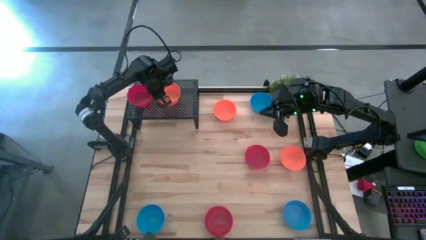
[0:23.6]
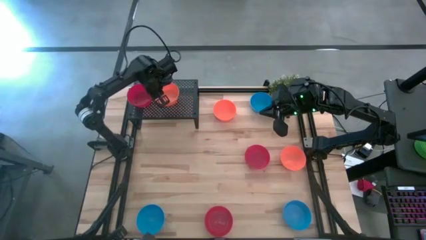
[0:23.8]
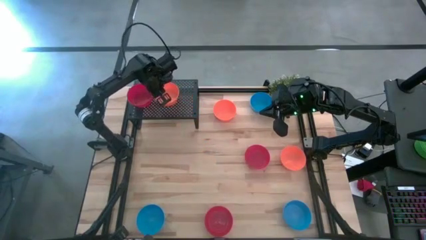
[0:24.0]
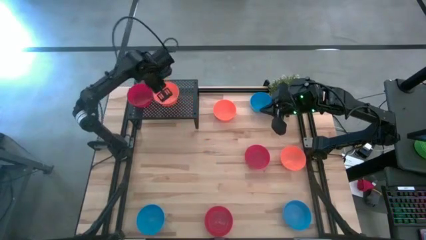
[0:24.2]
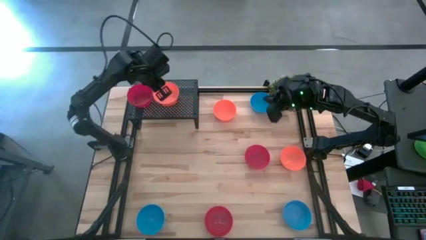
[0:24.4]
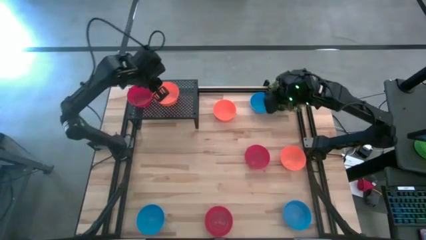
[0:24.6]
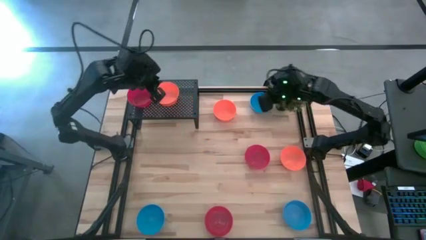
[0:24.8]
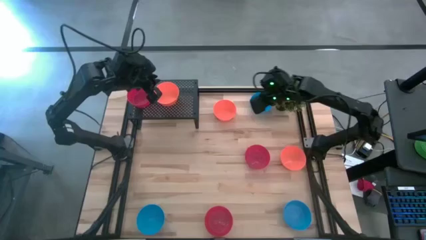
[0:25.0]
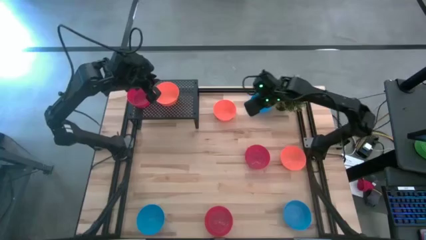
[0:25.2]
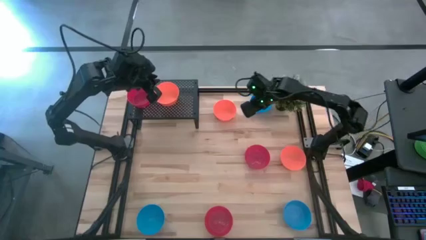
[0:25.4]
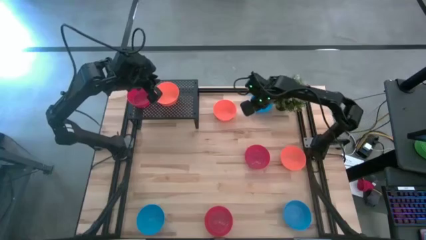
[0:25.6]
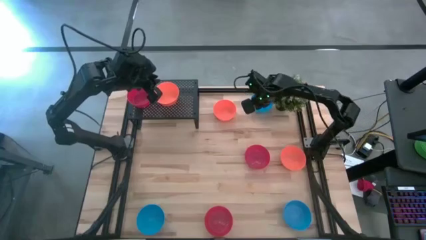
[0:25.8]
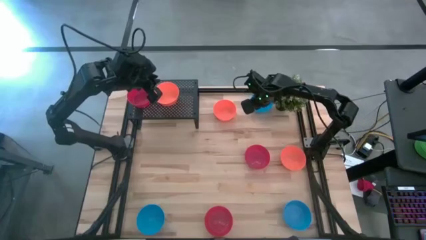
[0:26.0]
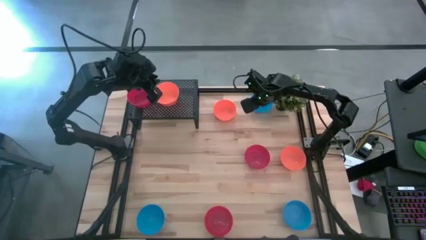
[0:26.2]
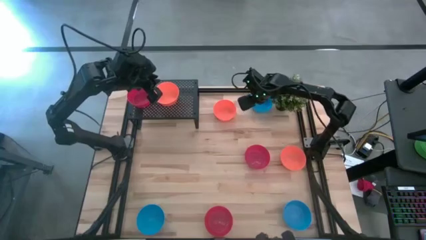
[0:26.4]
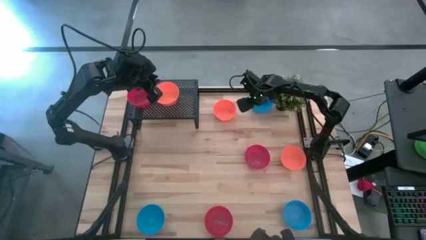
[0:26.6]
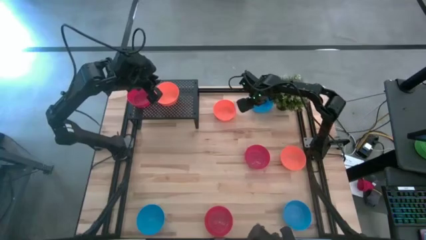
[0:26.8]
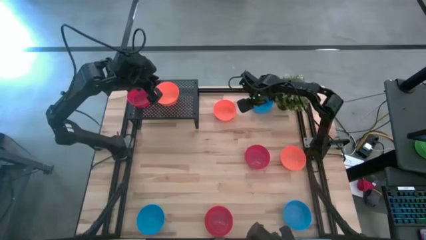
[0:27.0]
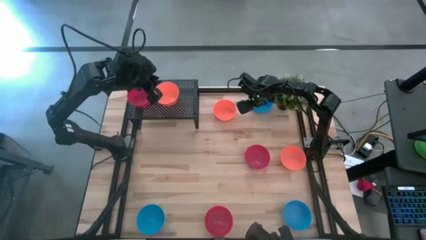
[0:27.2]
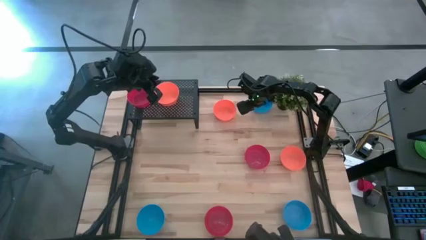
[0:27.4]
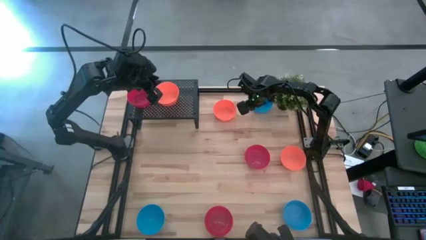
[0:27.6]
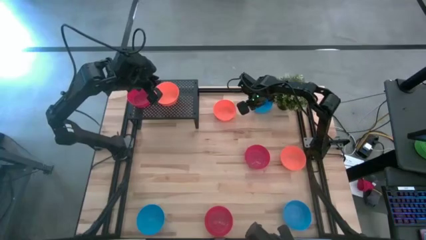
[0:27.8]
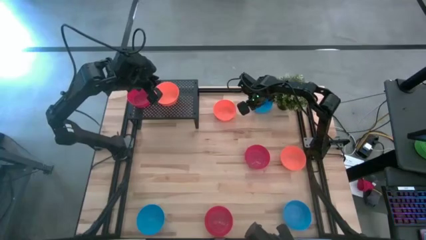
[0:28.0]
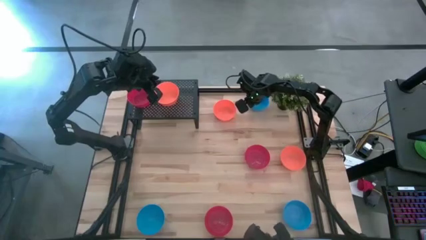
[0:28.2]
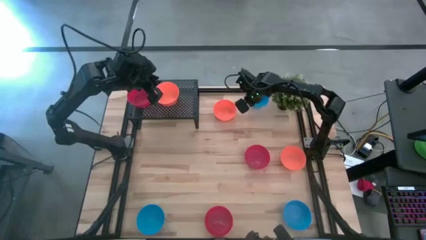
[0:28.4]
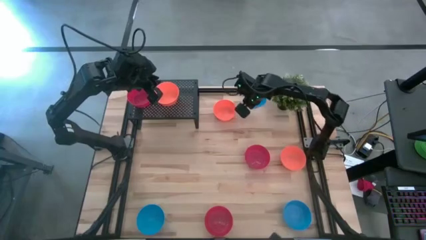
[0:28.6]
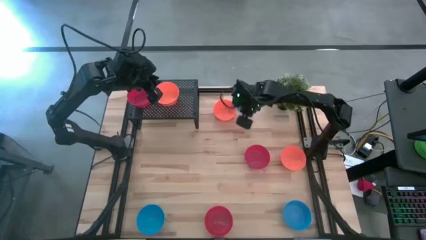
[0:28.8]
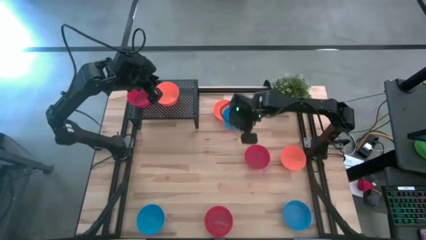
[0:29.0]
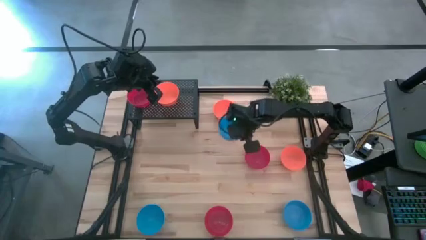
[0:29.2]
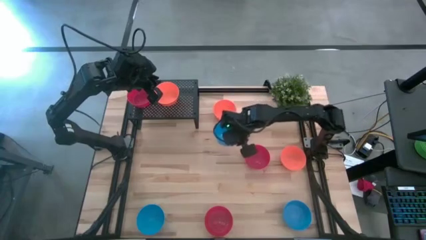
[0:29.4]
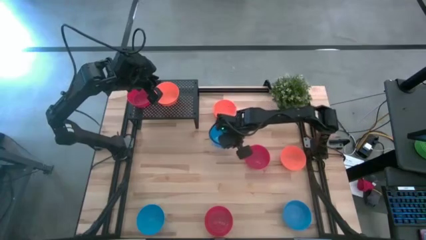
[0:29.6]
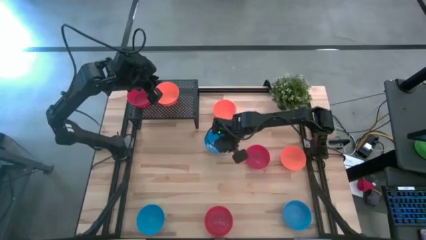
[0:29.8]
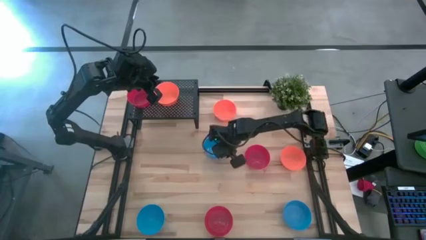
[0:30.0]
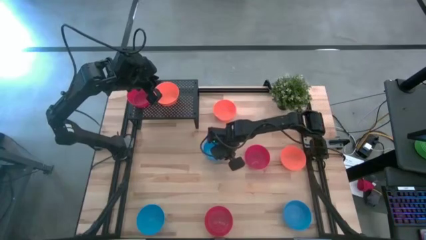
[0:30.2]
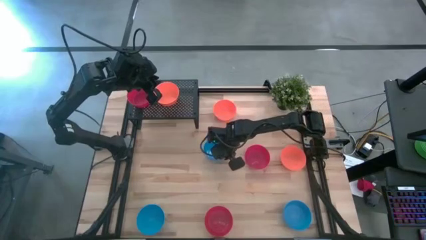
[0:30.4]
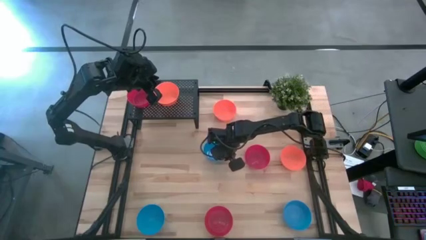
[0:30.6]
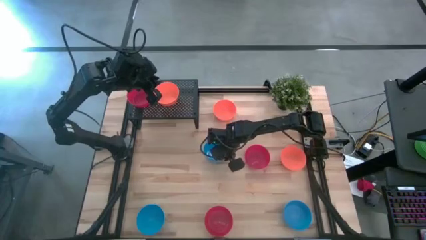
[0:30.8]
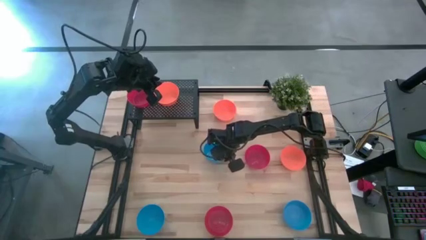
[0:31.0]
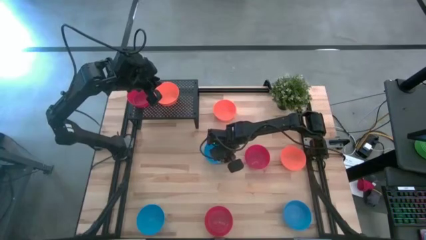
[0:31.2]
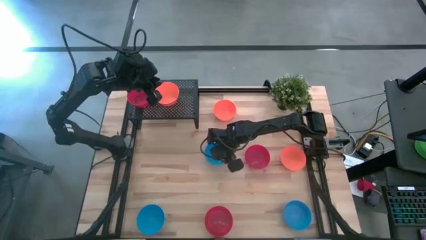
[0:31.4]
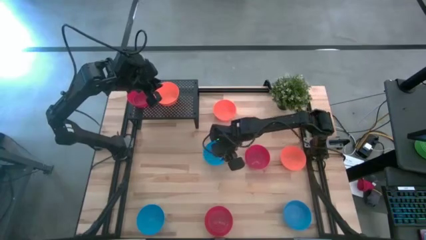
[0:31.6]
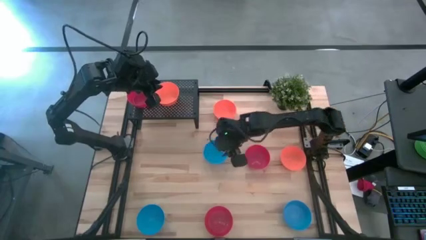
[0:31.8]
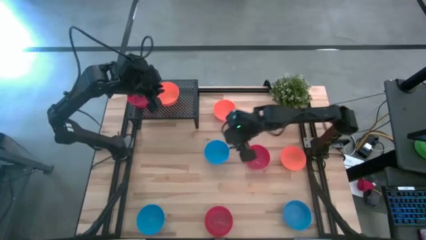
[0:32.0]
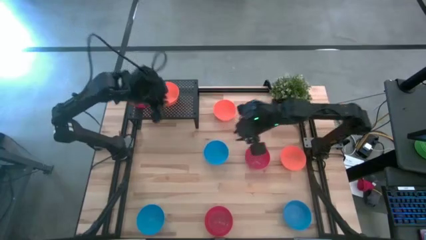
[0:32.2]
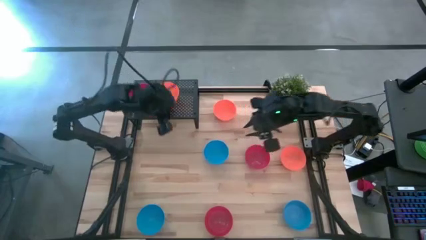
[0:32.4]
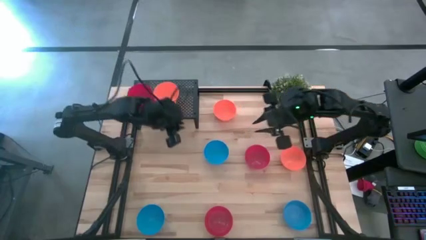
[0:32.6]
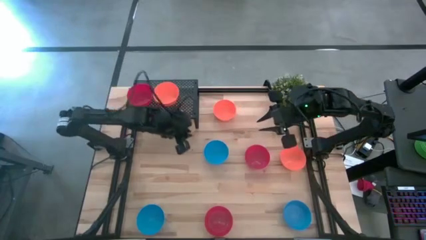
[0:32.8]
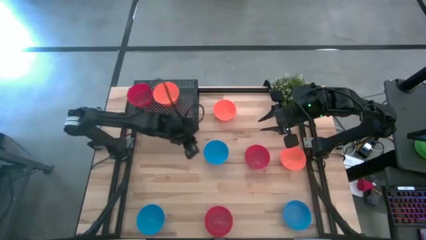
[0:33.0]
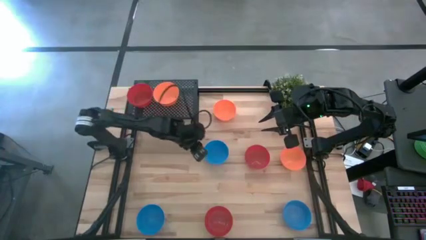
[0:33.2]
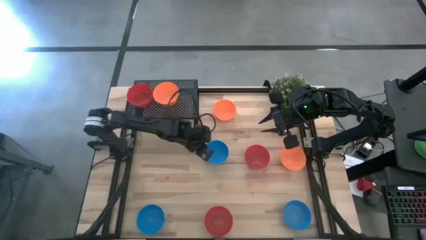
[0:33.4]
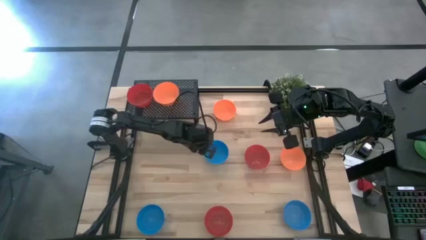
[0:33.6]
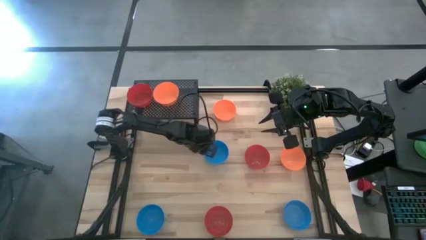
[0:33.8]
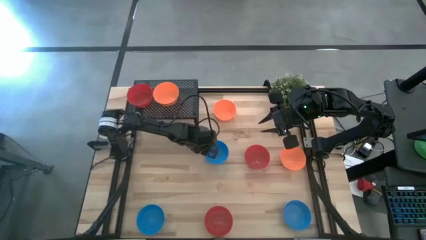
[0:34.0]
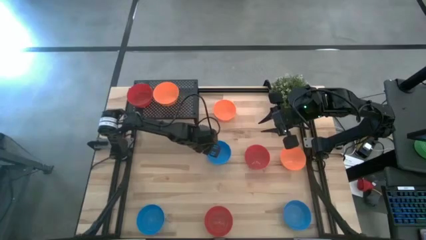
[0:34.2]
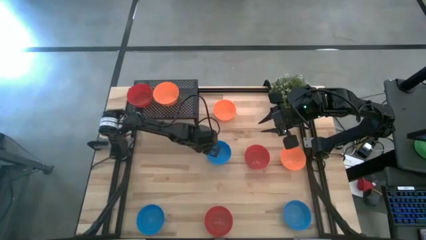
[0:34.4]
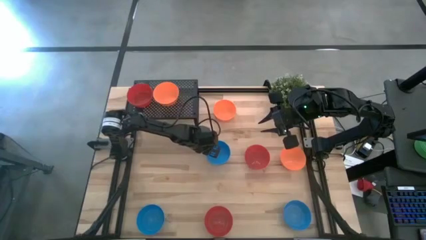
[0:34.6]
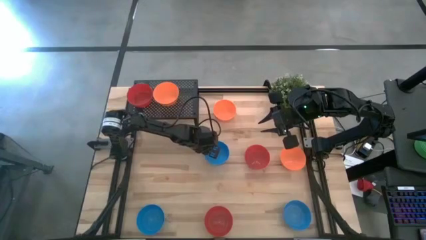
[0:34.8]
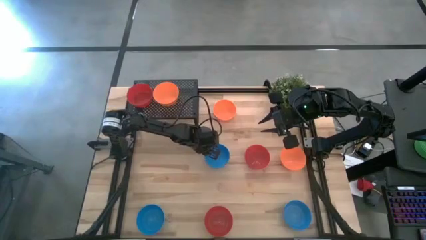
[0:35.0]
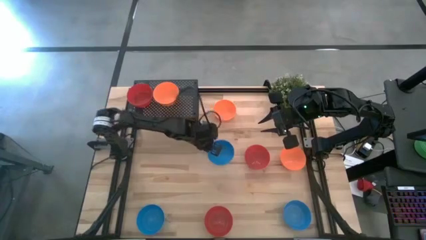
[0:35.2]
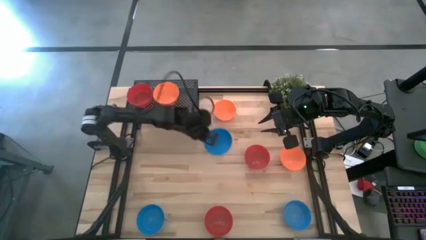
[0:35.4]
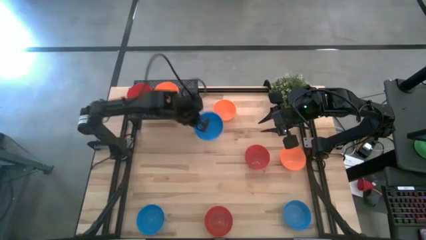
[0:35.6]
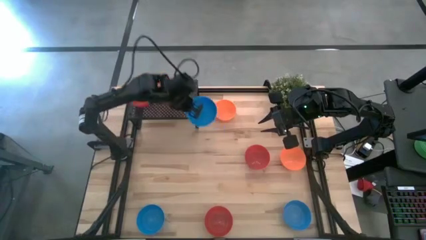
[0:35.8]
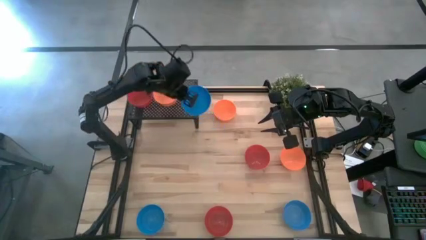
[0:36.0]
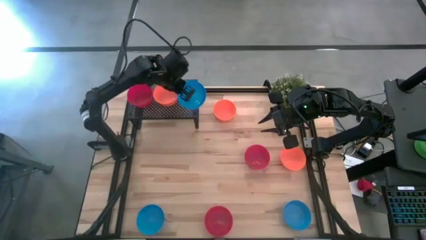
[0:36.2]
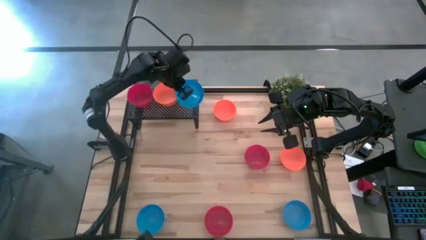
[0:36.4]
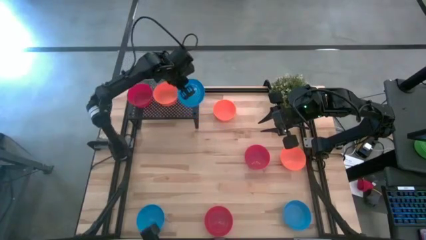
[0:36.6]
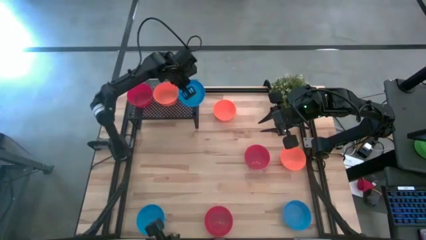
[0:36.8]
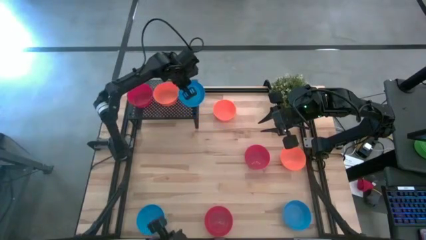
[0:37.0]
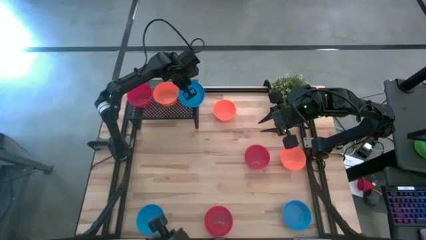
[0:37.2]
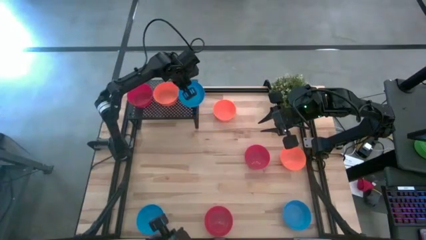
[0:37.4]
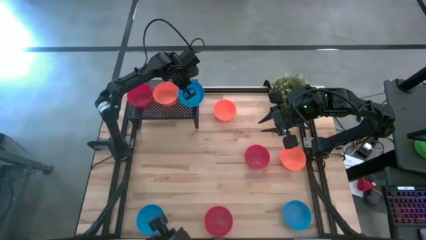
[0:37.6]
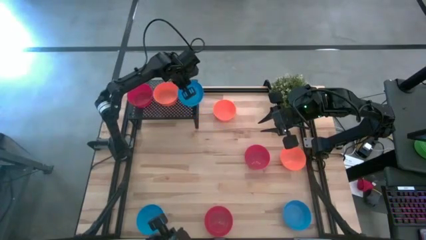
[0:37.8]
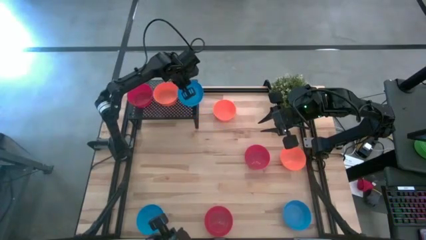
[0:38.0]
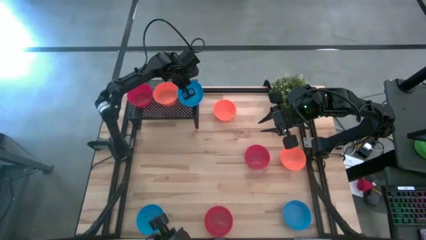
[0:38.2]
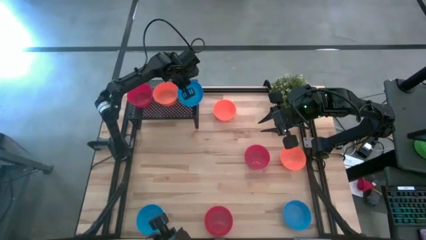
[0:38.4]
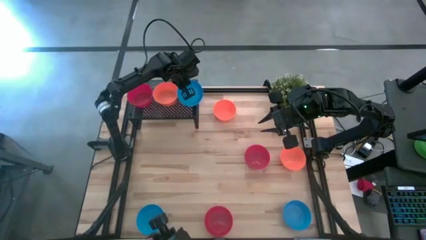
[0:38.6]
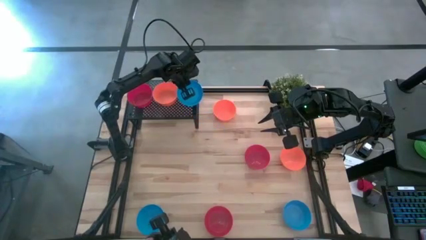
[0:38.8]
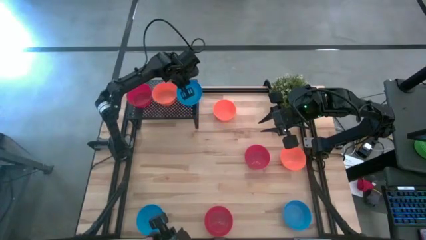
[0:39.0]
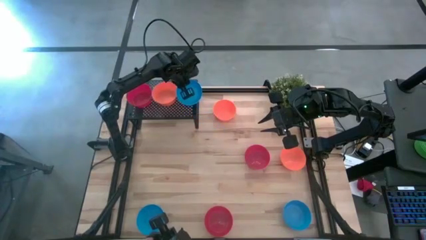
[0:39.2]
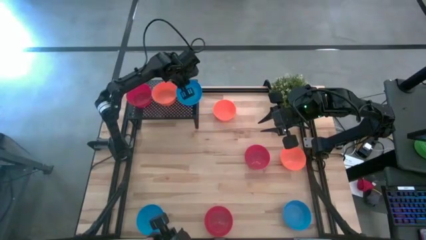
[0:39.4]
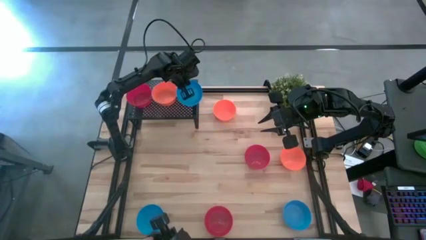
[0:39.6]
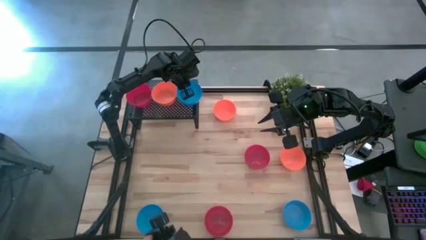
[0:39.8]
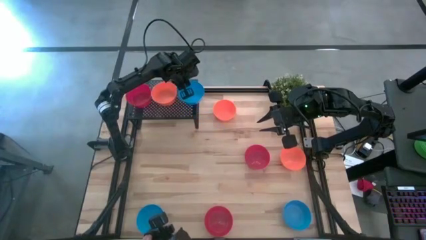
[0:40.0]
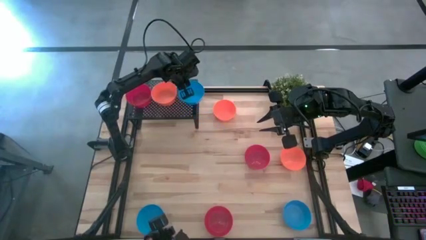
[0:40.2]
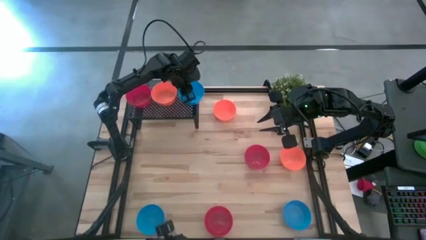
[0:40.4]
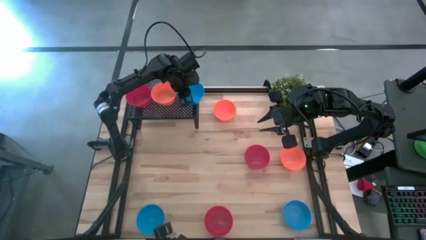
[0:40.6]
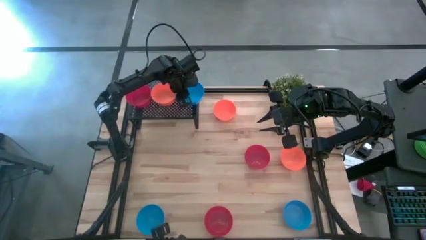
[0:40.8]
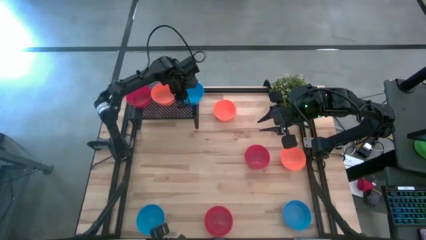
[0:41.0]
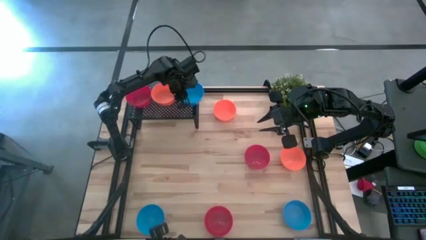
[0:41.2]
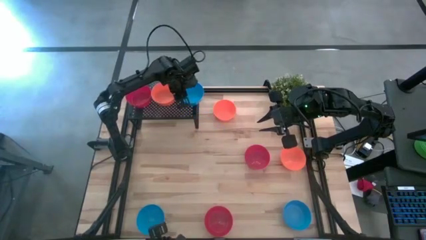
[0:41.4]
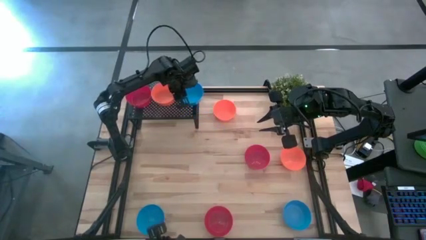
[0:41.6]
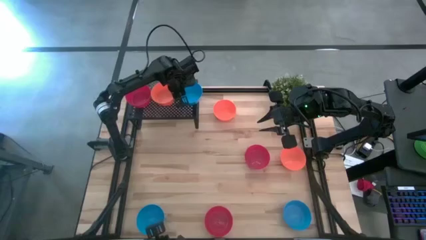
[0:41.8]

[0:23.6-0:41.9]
Task: Pick & Place Mini bowls
Put the top blue bowl on the shelf
